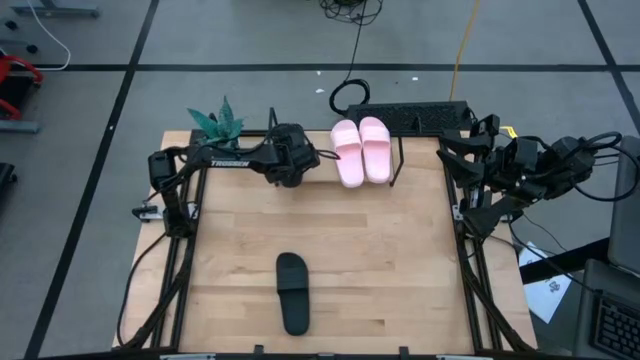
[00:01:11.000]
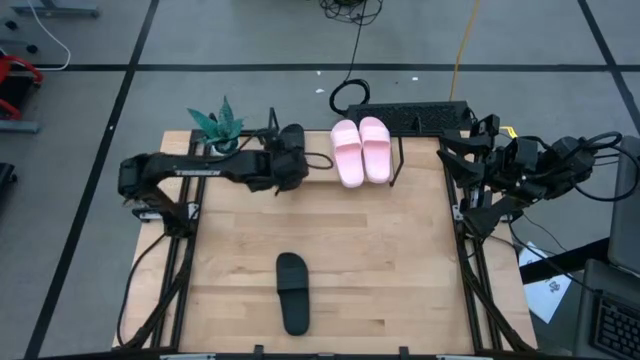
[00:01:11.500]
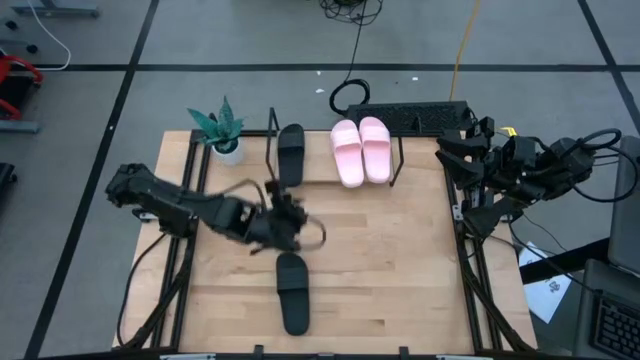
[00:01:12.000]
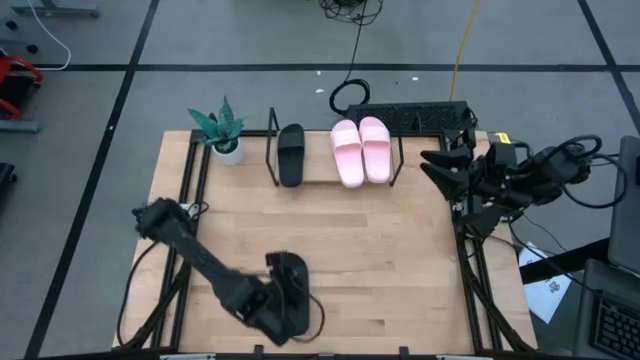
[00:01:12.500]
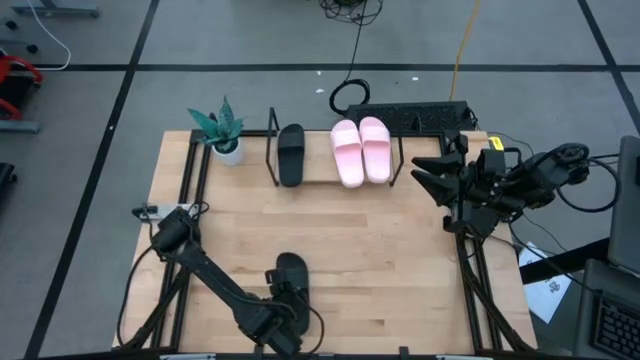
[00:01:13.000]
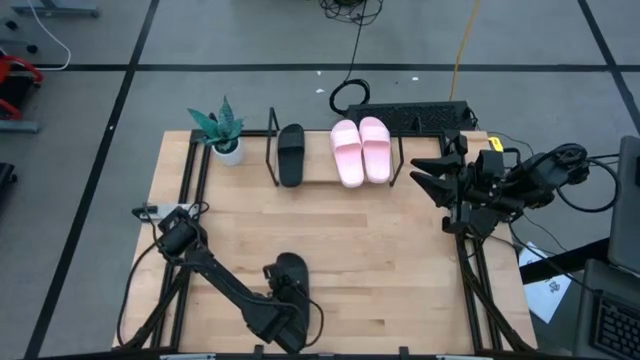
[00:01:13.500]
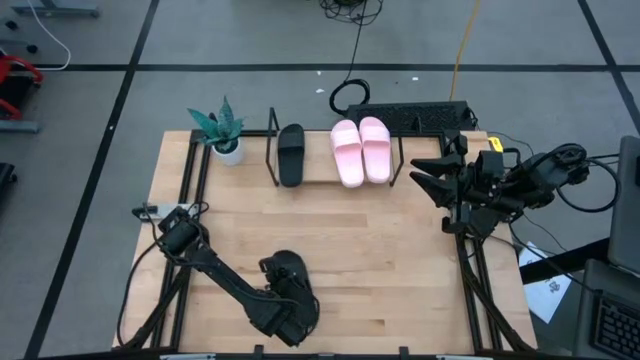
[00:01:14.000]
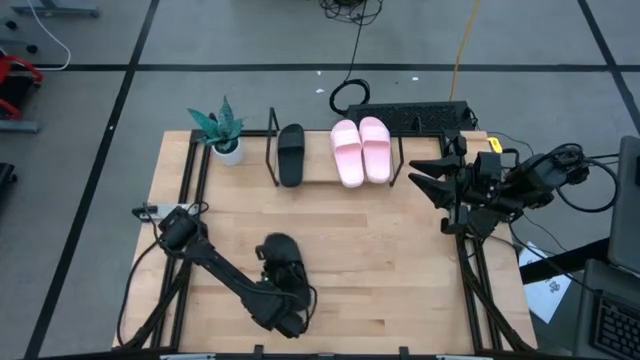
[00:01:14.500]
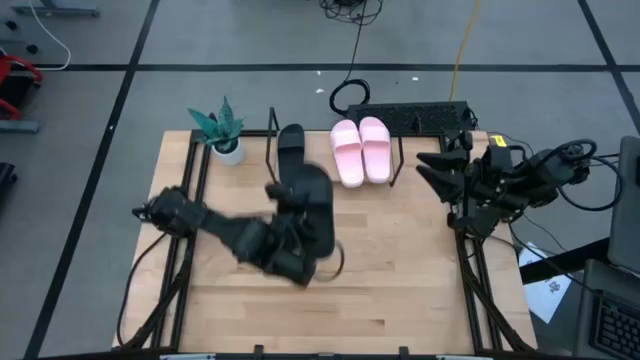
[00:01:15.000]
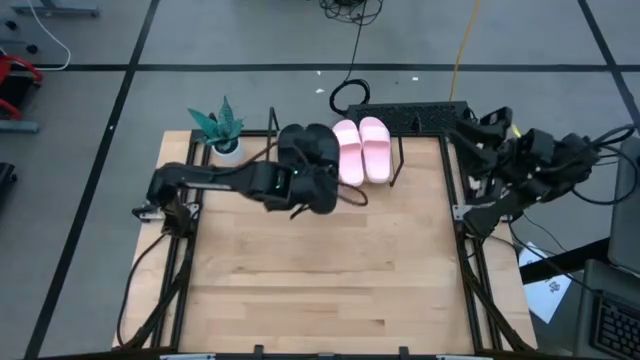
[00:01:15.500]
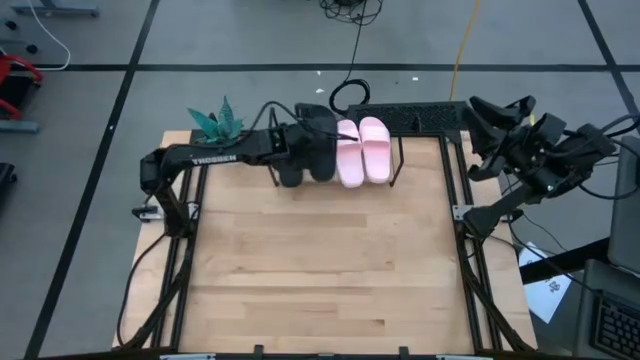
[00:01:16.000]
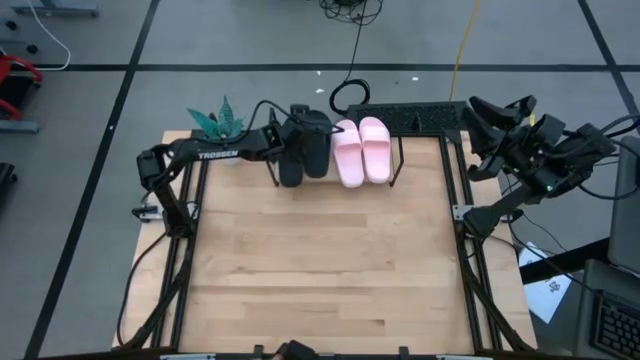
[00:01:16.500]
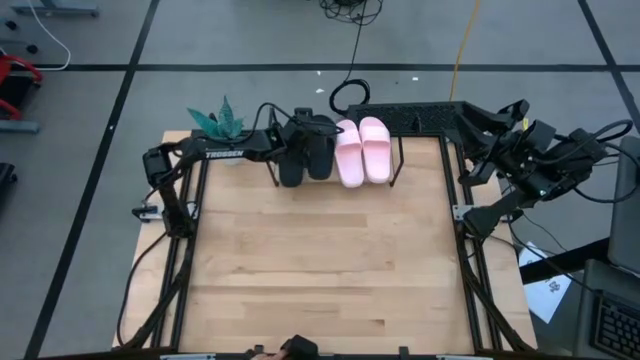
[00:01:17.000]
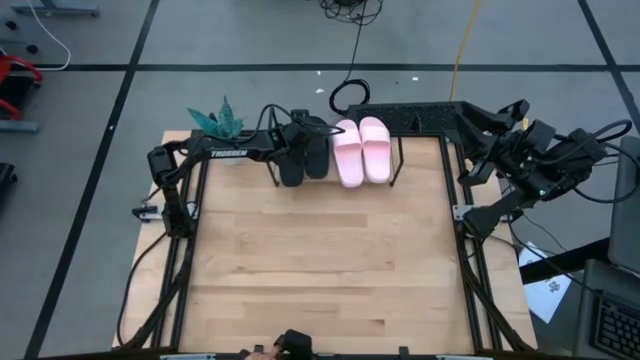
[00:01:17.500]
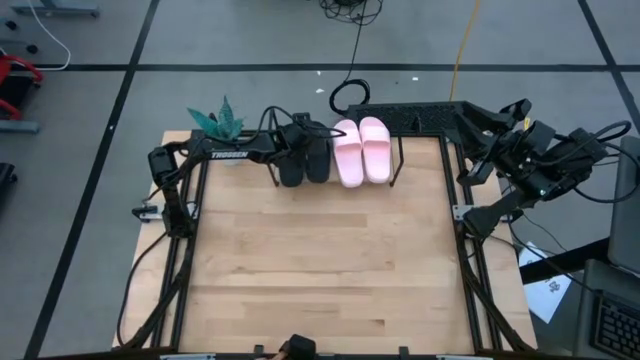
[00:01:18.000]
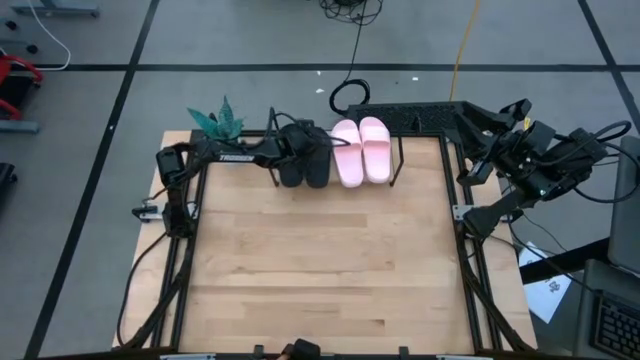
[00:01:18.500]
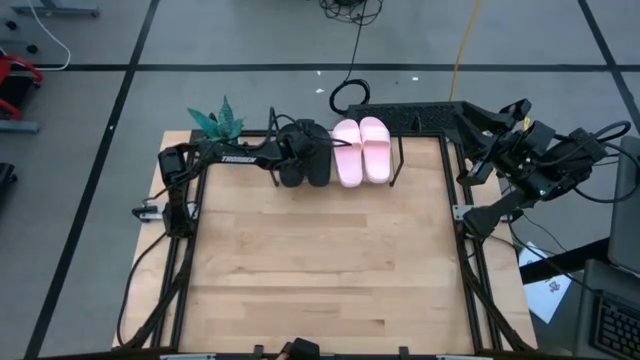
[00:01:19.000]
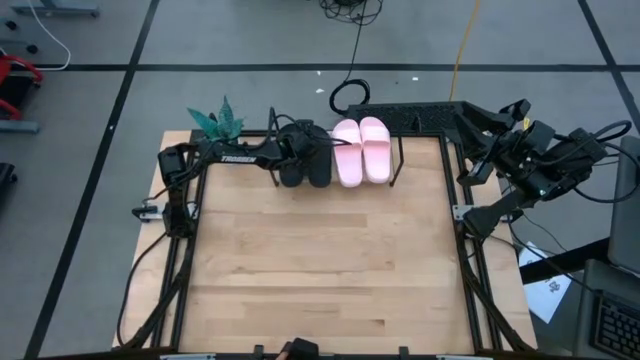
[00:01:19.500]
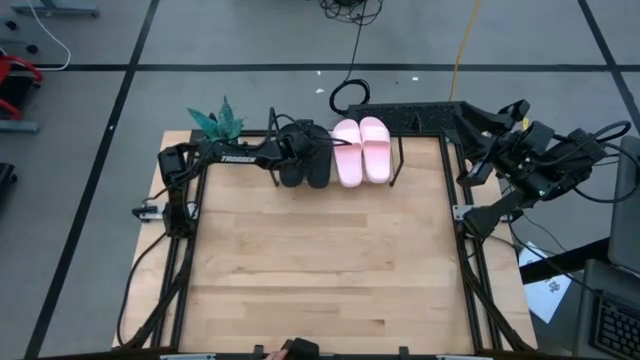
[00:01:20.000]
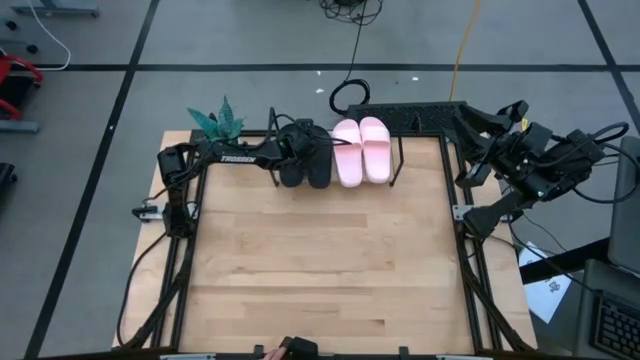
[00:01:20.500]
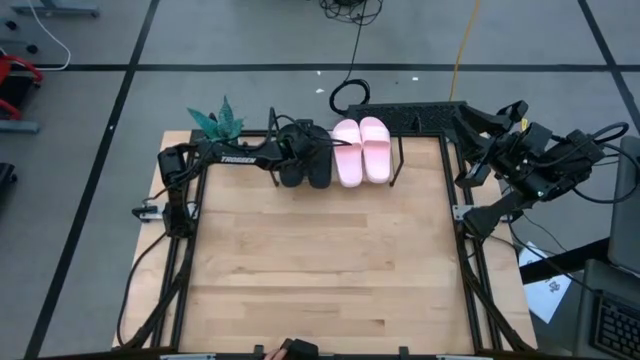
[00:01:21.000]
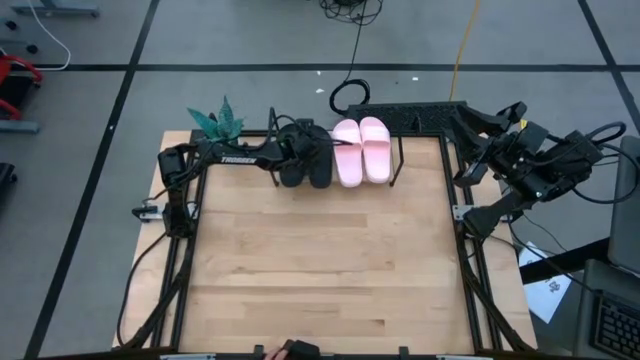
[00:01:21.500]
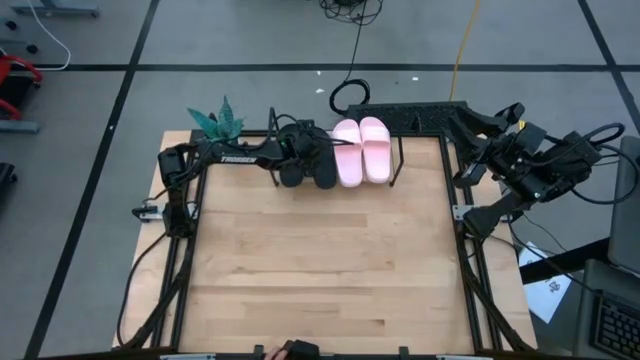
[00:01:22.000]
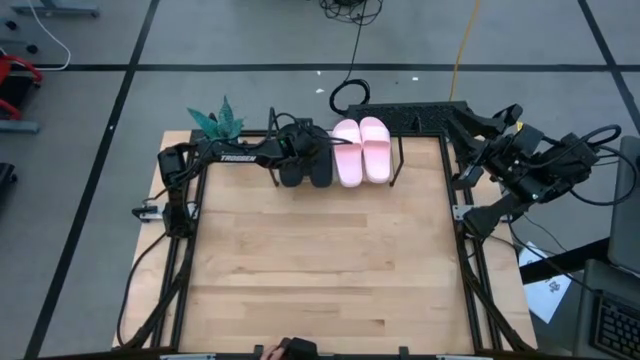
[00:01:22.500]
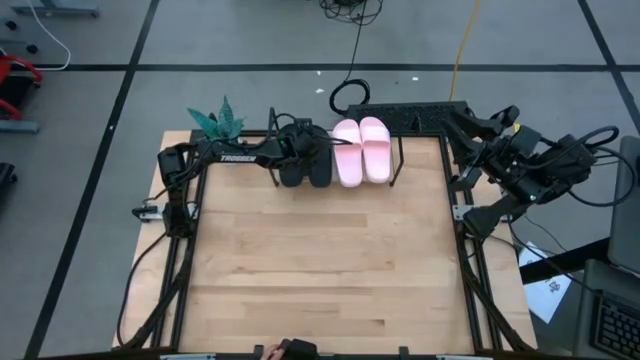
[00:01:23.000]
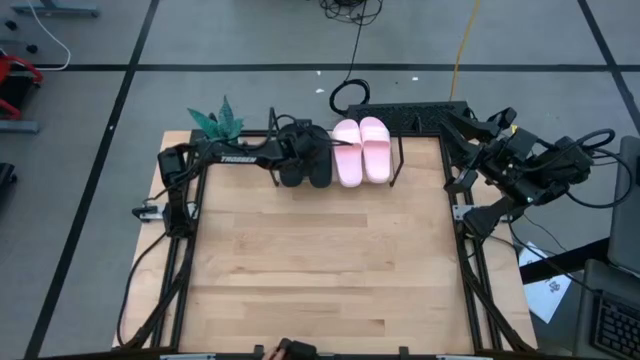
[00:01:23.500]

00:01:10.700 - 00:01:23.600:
Task: Pick and place slides into the shelf
Put the black slipper on the shelf
